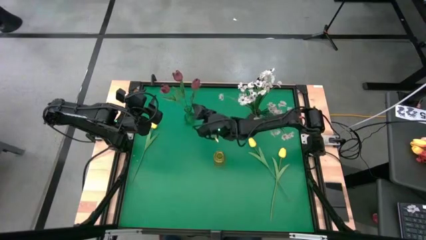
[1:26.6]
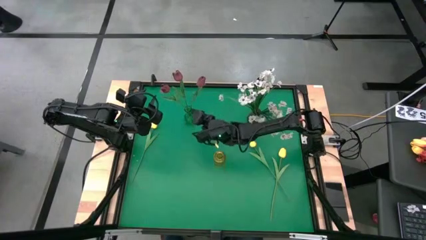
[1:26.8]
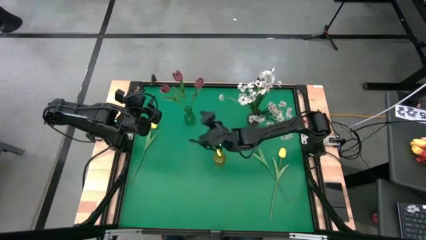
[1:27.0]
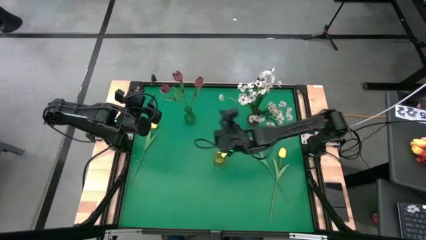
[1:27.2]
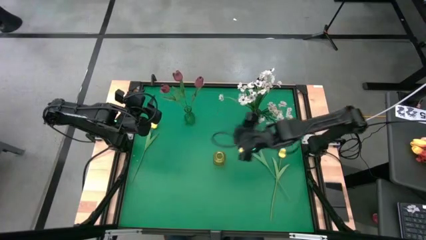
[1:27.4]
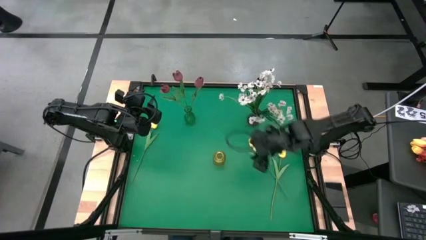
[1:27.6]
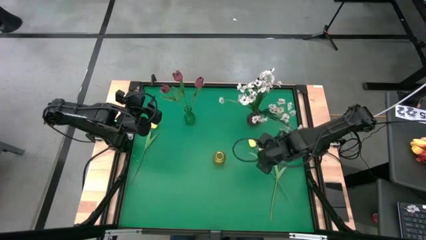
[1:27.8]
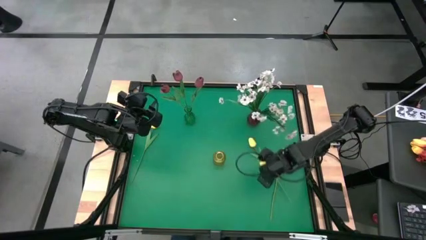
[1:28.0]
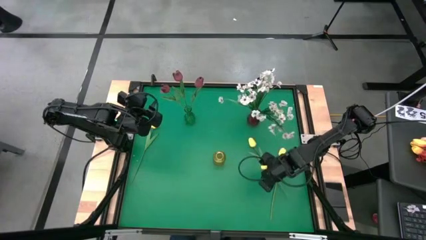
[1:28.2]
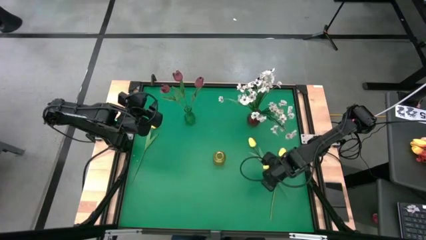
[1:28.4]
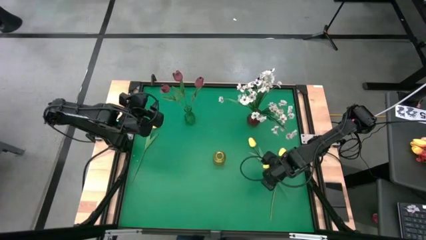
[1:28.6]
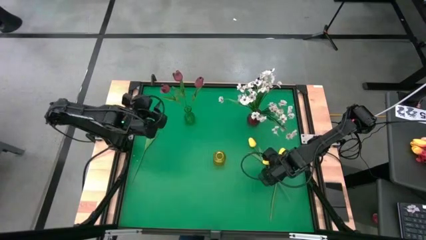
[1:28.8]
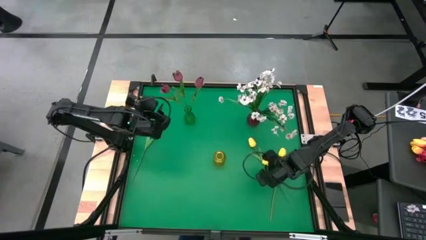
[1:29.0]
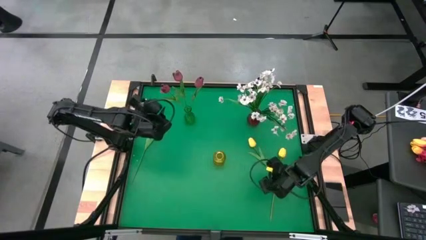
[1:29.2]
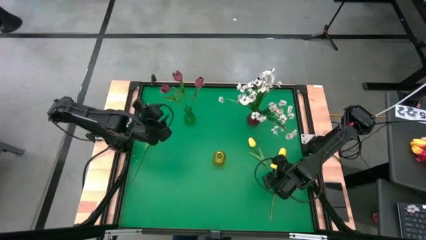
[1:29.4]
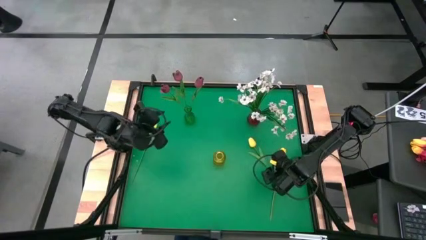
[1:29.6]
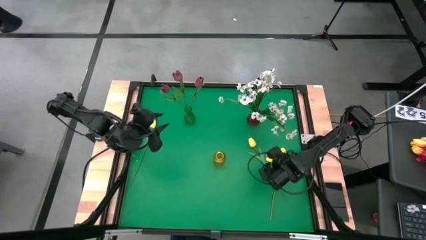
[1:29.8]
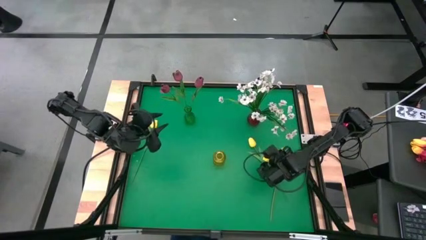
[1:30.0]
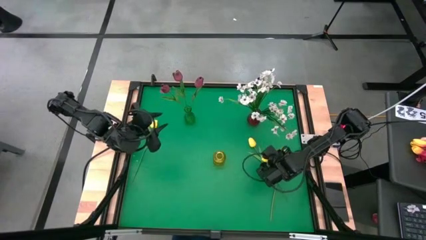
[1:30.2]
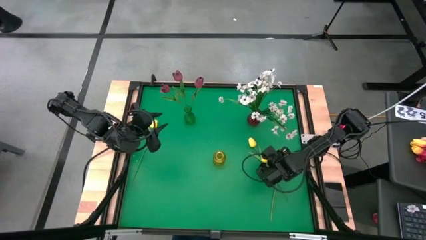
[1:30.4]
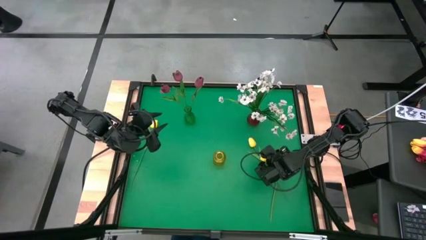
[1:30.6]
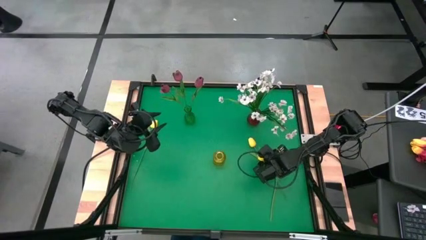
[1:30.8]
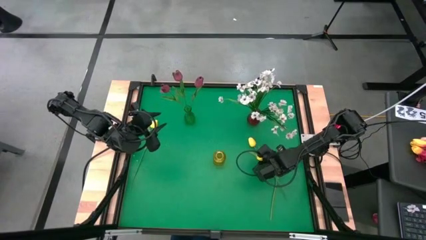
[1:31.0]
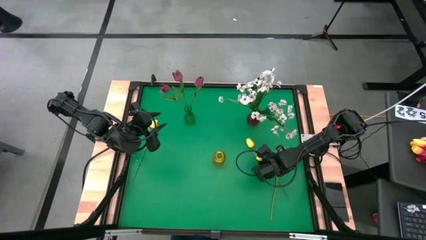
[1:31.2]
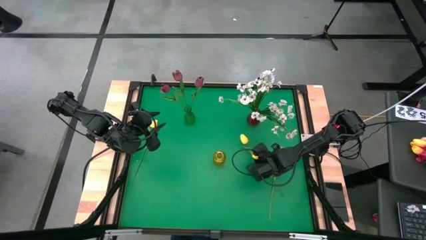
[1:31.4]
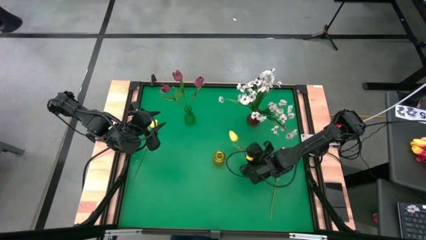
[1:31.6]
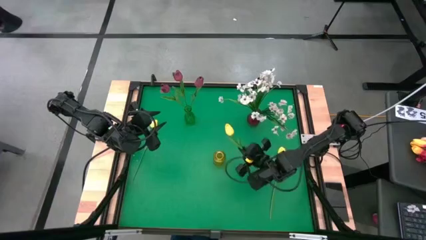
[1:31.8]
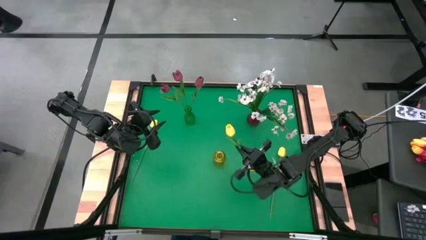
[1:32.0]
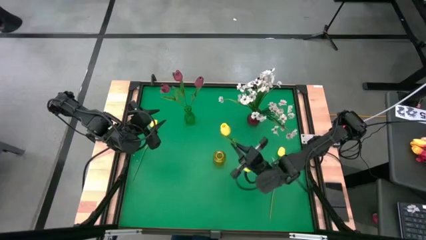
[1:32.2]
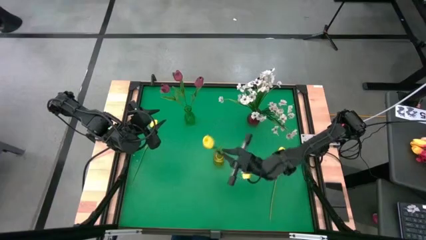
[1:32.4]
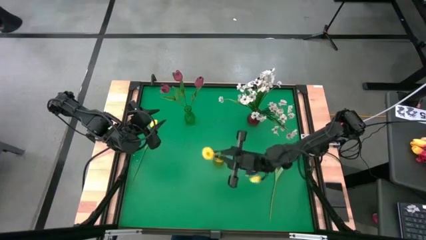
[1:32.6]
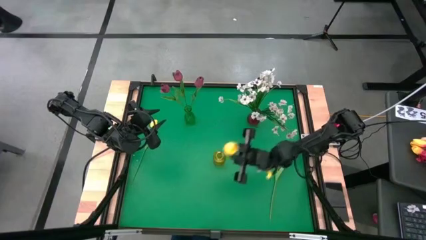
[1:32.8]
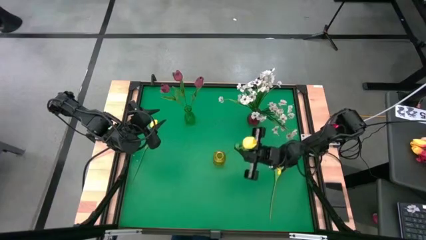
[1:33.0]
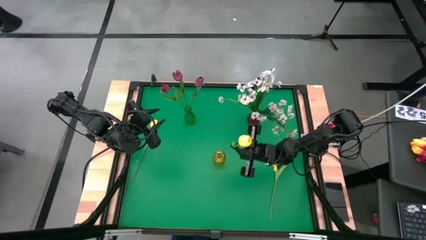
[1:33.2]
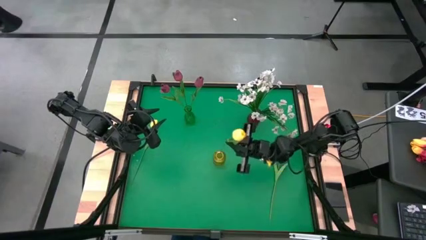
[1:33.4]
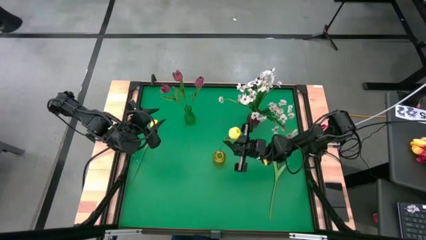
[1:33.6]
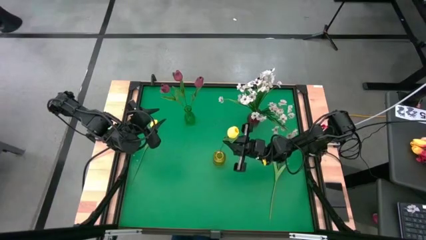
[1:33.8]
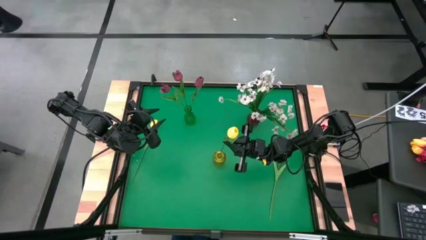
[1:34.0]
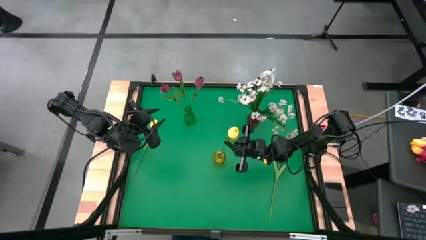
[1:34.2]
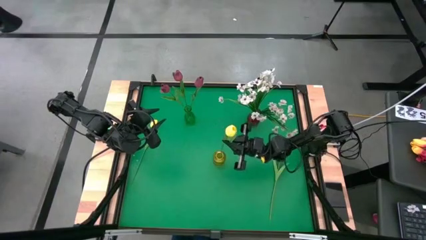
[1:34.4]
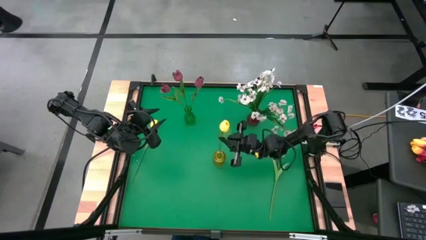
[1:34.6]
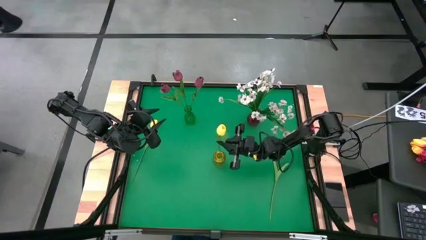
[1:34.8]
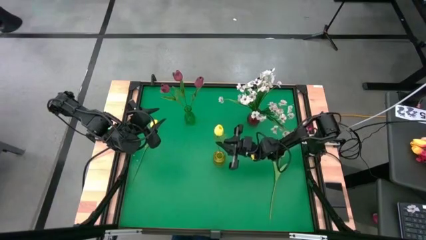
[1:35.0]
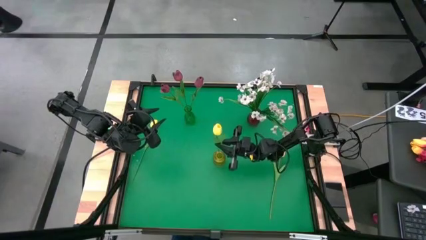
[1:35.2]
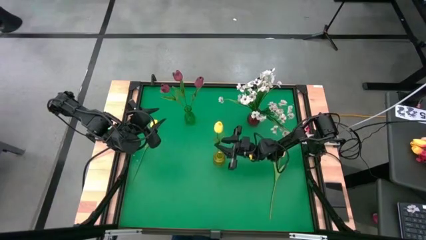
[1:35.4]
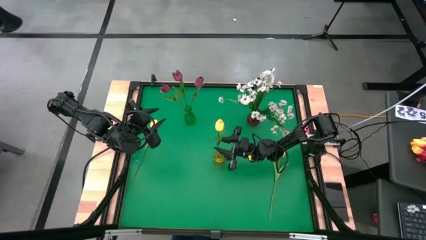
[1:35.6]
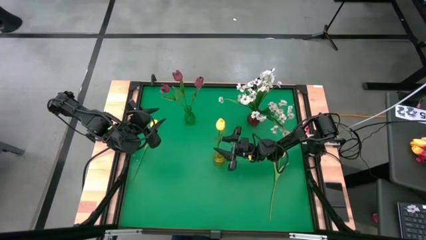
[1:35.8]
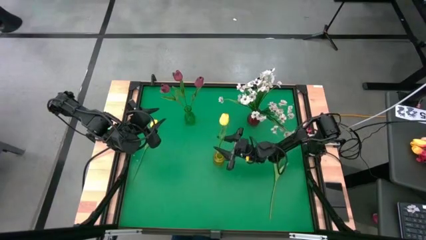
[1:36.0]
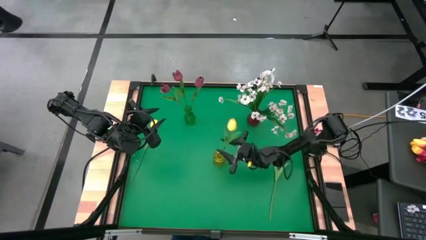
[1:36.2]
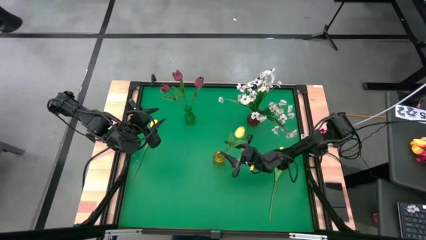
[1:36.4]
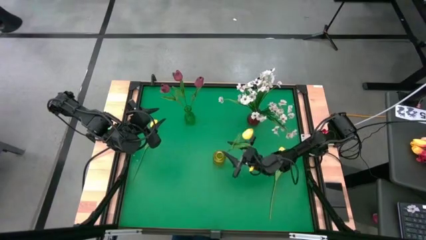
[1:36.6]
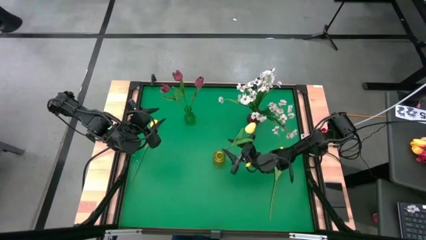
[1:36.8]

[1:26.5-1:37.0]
Task: Sort flowers into vase by color
Put the center yellow flower into the yellow vase

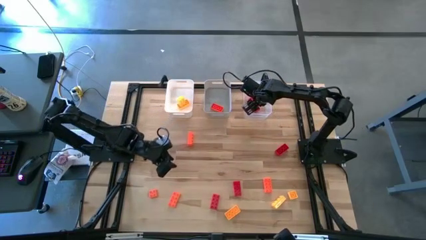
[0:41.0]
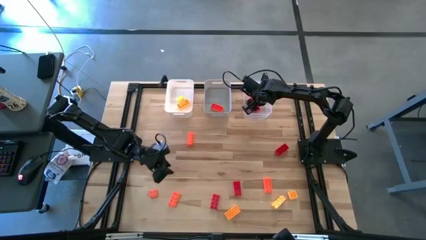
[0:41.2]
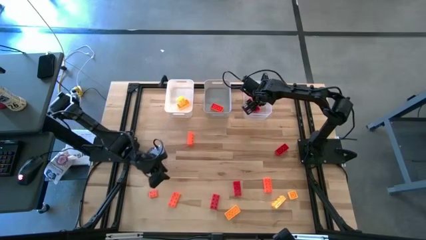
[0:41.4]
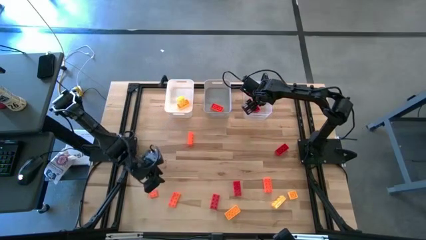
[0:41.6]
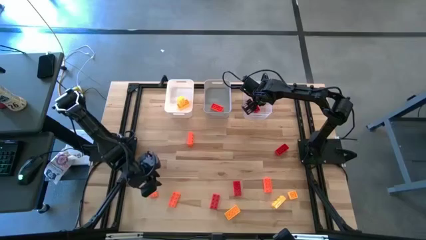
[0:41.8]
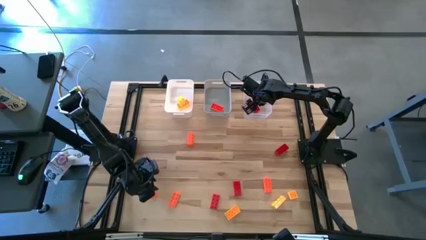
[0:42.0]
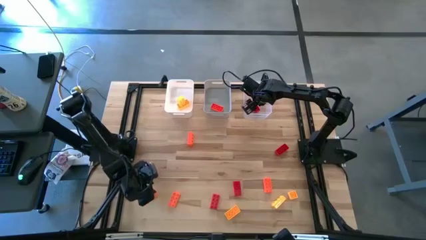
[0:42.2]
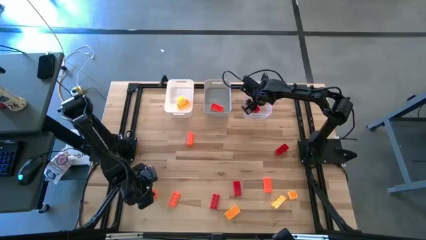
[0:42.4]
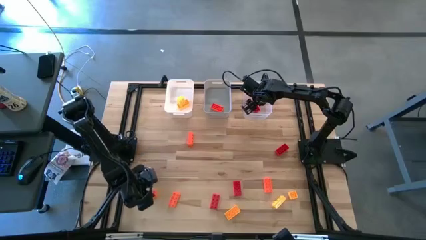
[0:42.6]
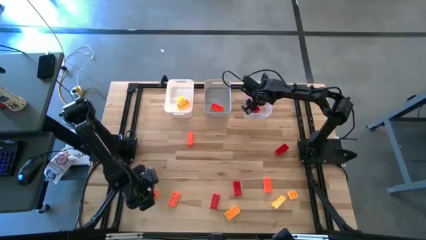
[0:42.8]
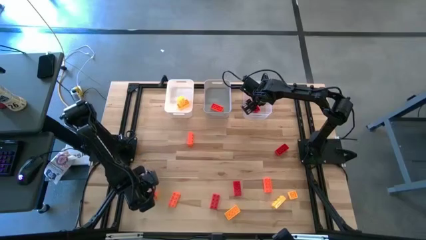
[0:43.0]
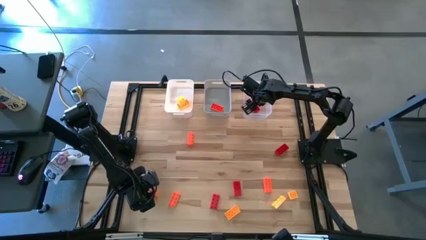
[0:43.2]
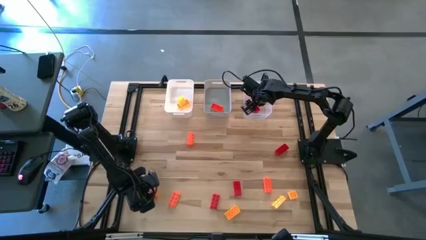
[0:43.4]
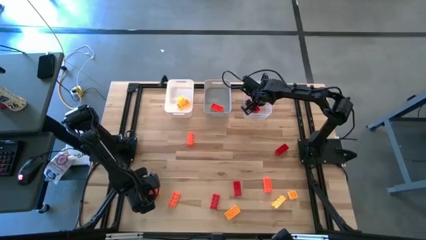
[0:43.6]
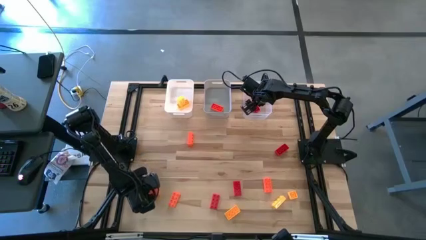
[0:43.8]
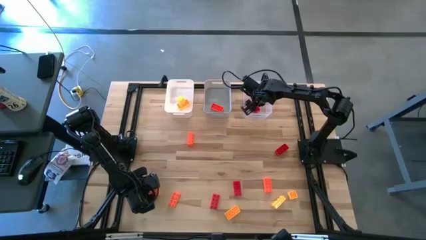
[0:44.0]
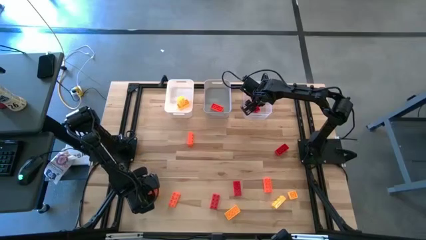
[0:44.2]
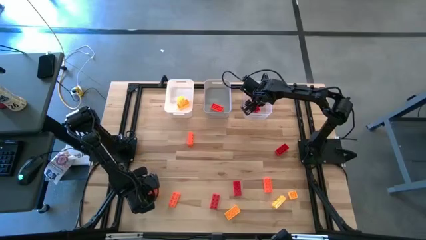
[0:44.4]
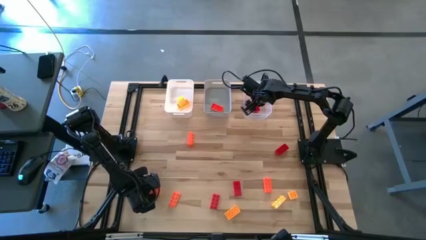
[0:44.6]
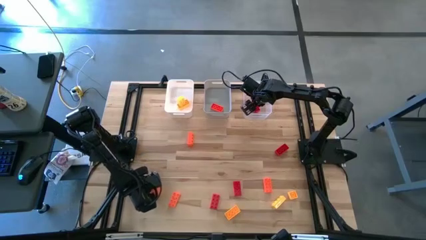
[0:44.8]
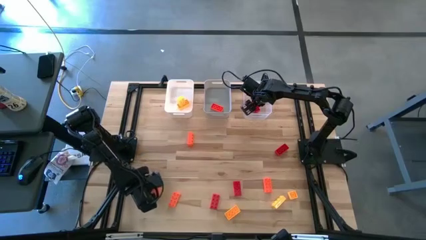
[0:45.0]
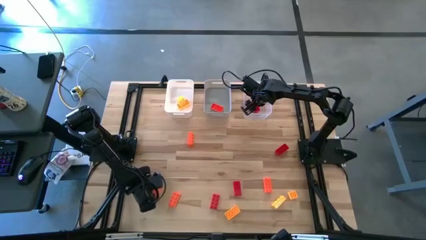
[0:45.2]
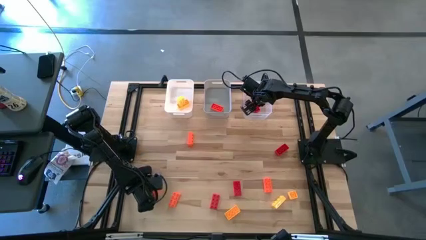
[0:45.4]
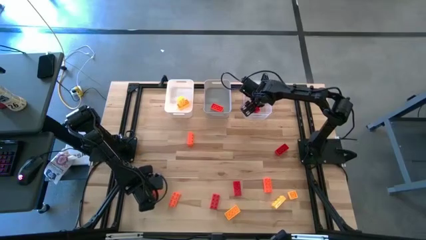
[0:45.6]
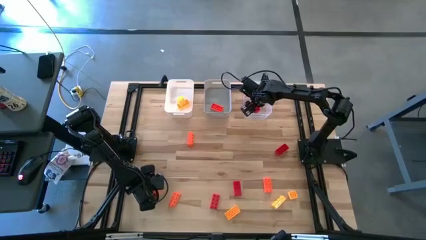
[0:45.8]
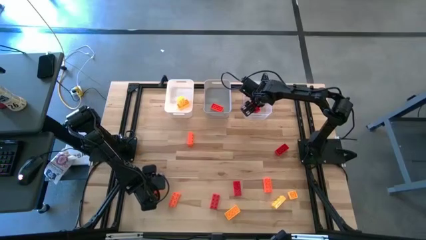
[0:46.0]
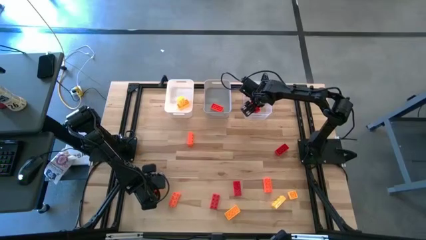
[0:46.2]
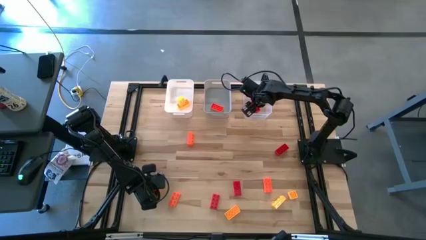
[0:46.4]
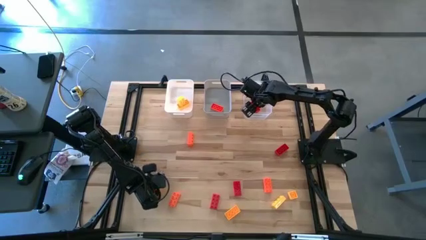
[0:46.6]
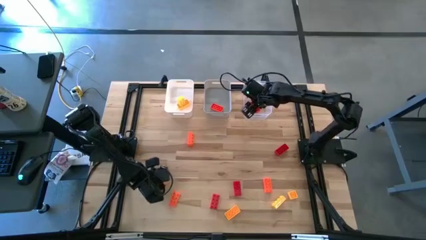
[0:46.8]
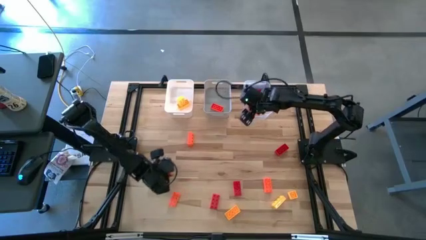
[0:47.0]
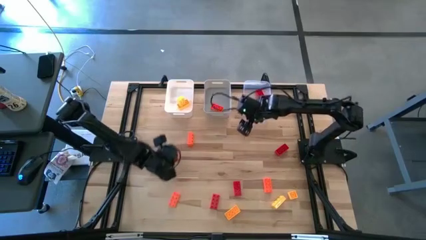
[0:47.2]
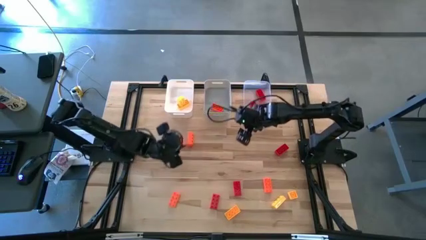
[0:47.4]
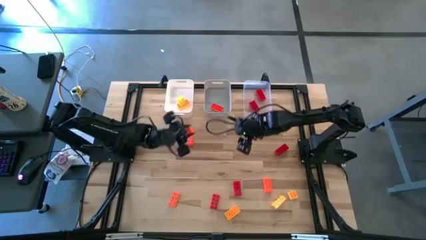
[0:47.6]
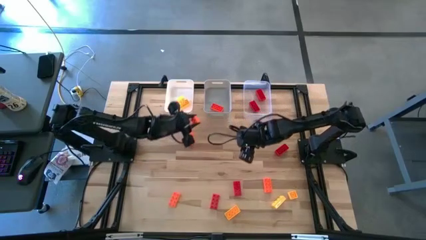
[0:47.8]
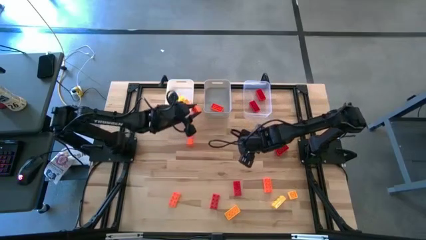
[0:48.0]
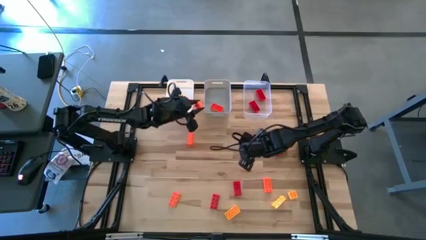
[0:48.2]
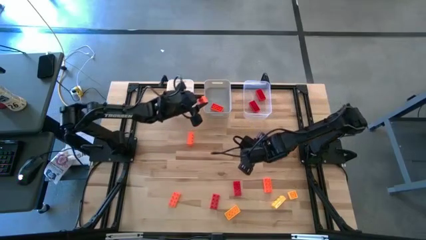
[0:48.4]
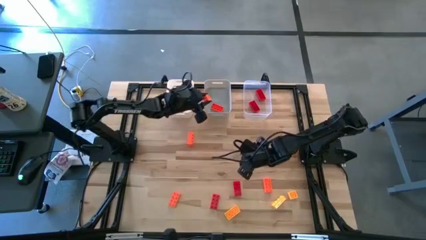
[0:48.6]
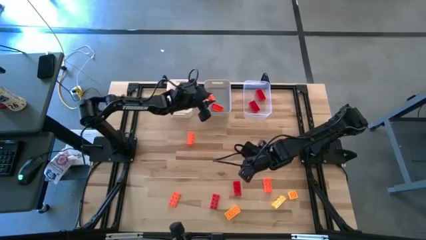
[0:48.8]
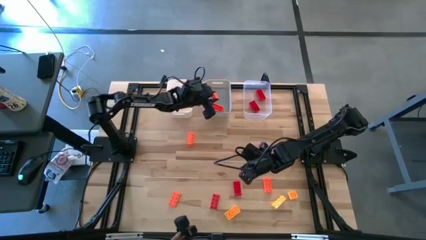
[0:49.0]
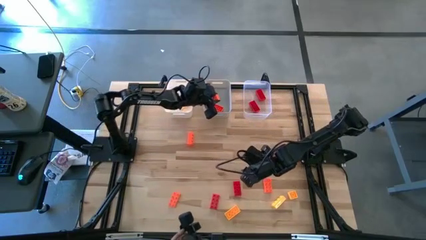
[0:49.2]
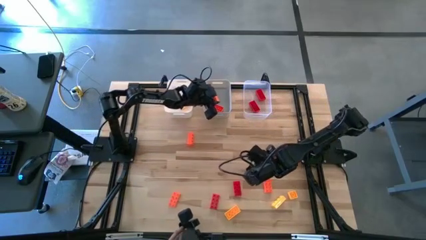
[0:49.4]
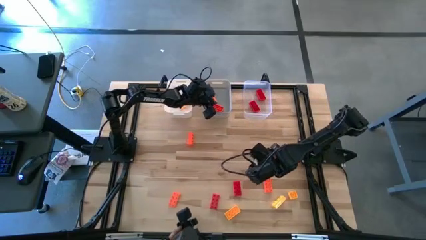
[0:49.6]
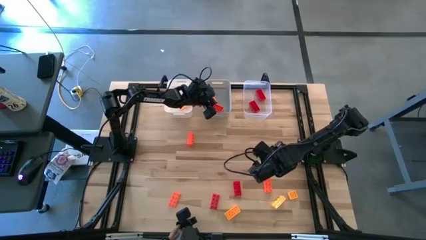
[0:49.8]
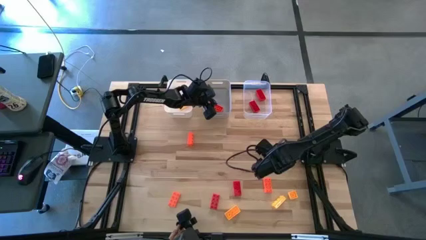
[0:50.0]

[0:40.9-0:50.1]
Task: Sort & place blocks by color
Put the orange game piece into the gray bin
